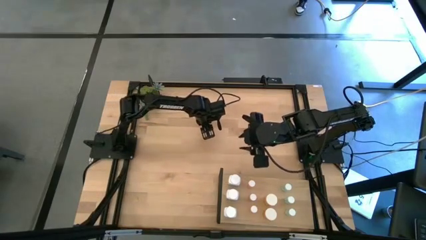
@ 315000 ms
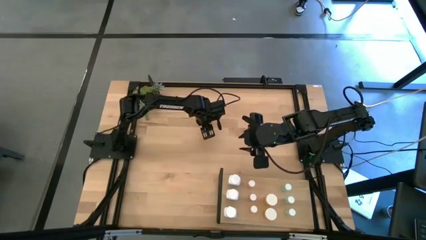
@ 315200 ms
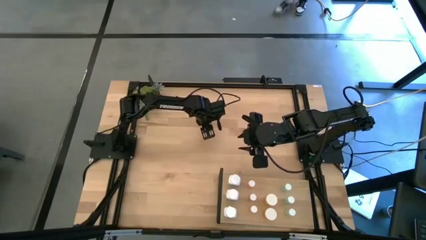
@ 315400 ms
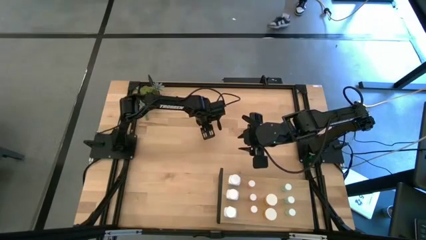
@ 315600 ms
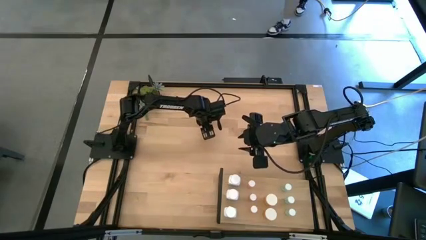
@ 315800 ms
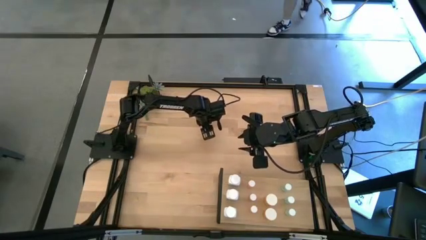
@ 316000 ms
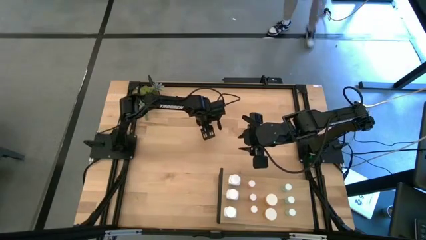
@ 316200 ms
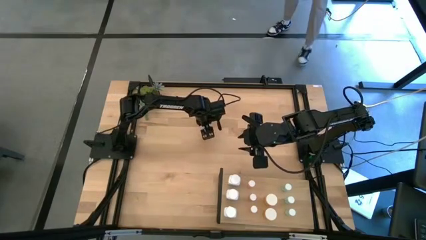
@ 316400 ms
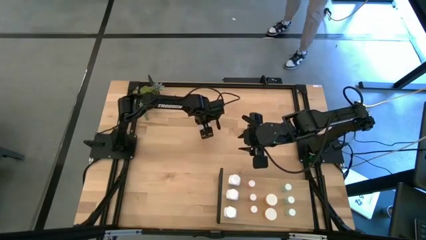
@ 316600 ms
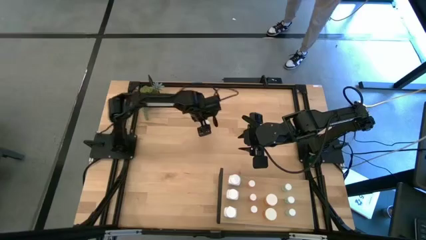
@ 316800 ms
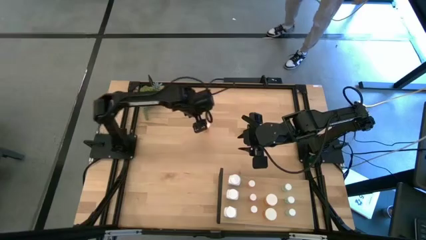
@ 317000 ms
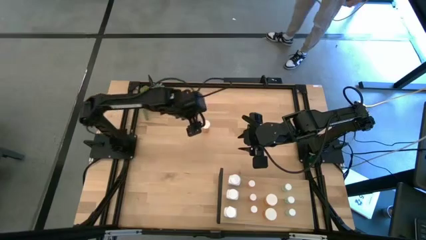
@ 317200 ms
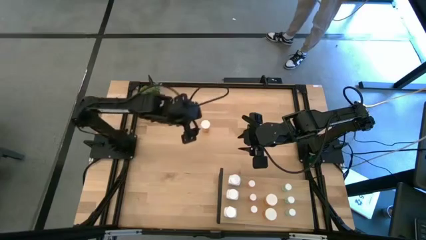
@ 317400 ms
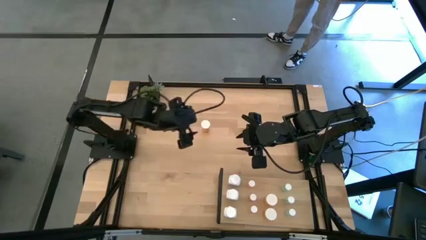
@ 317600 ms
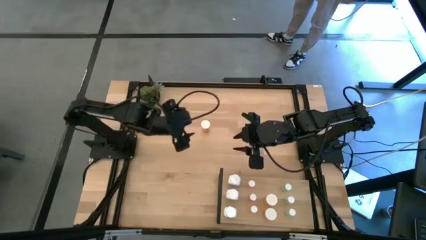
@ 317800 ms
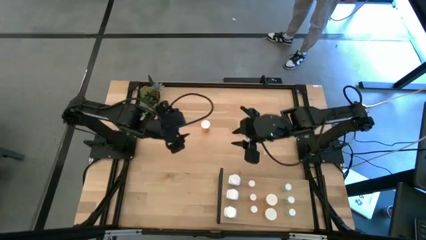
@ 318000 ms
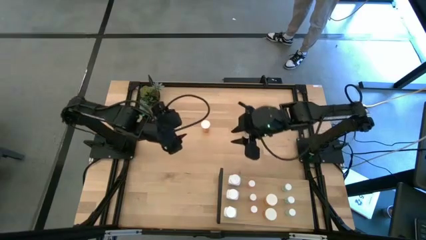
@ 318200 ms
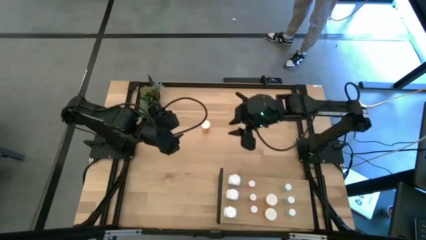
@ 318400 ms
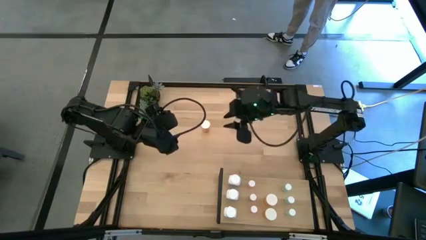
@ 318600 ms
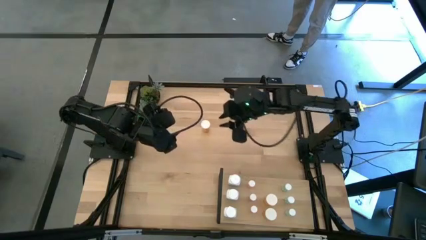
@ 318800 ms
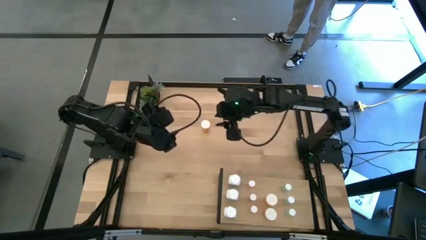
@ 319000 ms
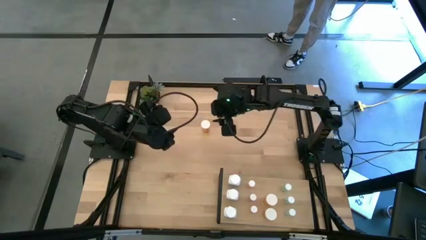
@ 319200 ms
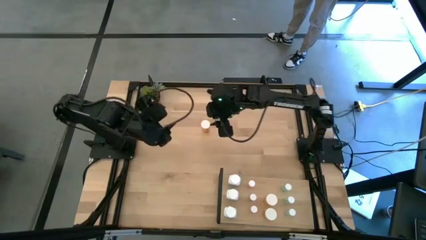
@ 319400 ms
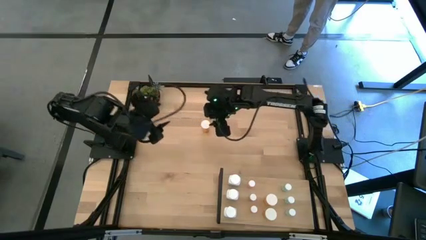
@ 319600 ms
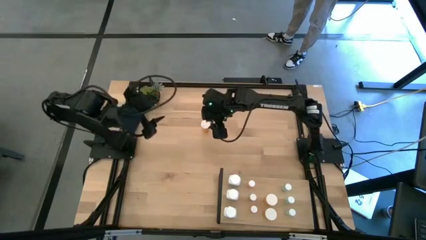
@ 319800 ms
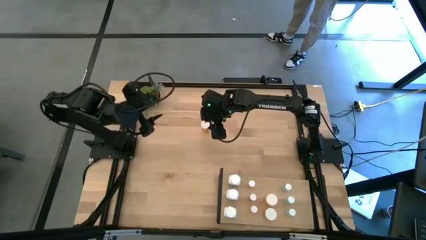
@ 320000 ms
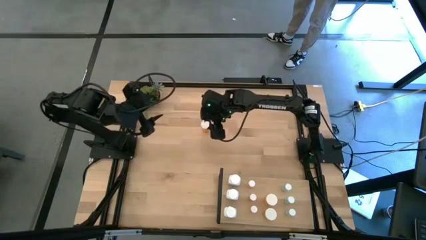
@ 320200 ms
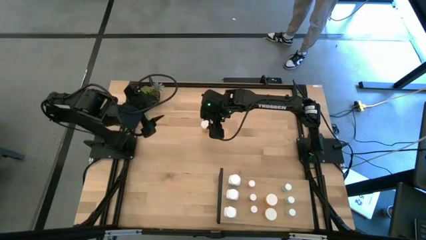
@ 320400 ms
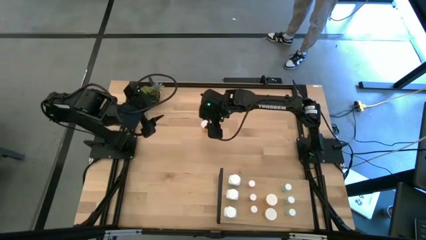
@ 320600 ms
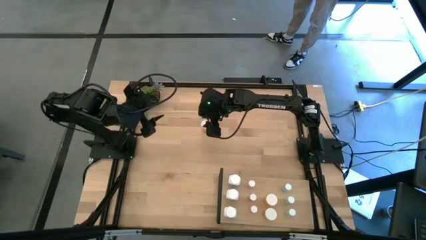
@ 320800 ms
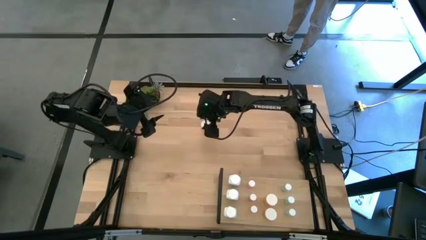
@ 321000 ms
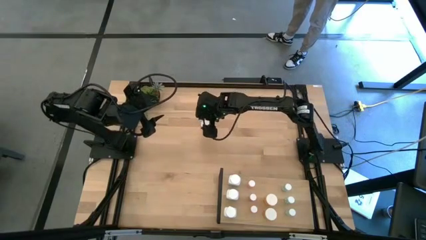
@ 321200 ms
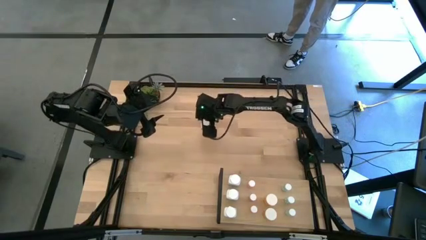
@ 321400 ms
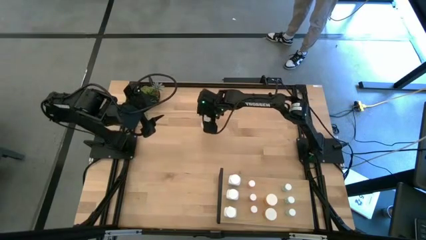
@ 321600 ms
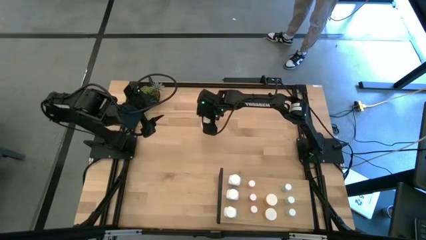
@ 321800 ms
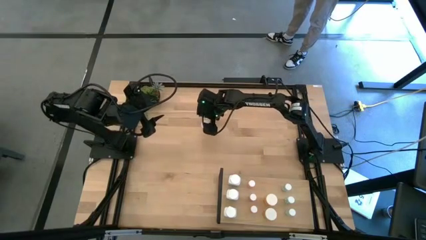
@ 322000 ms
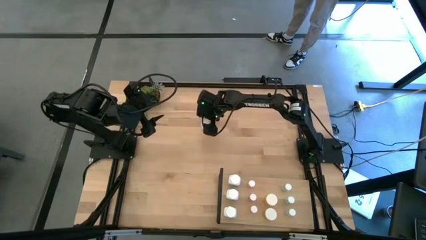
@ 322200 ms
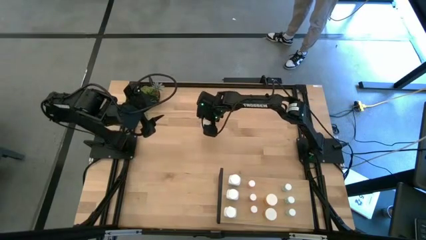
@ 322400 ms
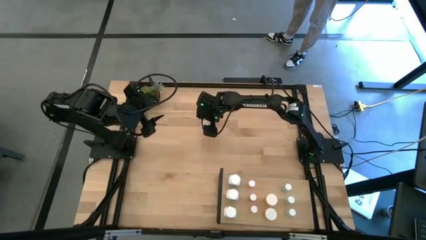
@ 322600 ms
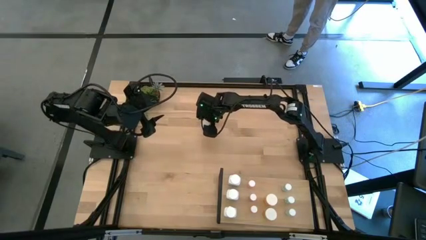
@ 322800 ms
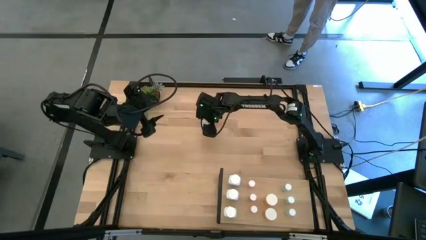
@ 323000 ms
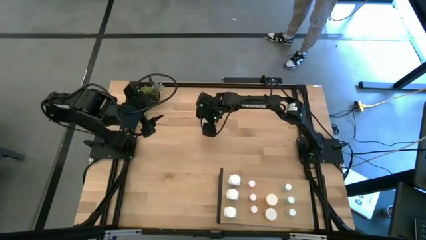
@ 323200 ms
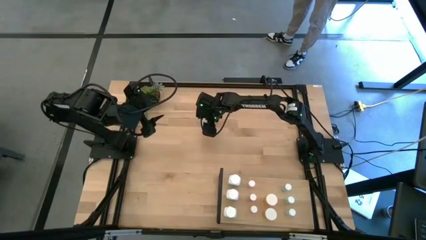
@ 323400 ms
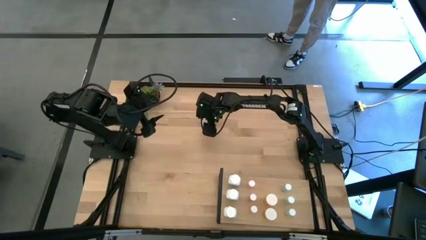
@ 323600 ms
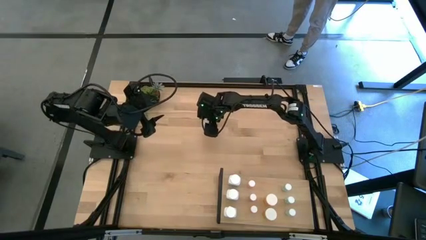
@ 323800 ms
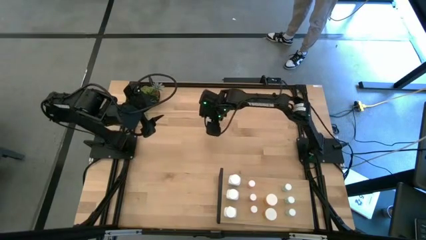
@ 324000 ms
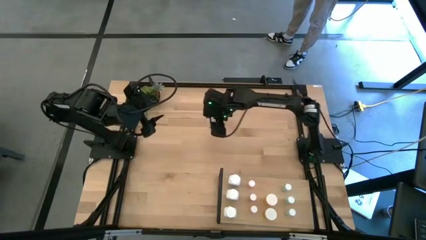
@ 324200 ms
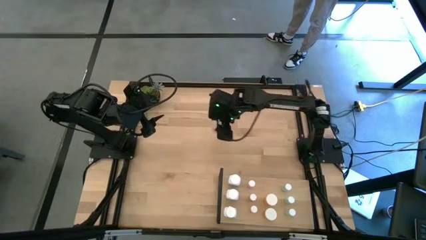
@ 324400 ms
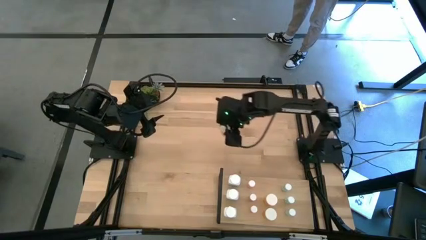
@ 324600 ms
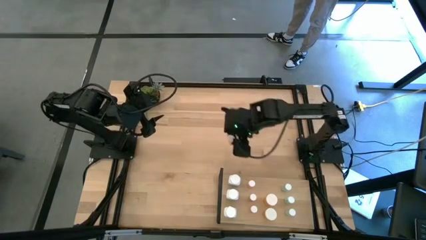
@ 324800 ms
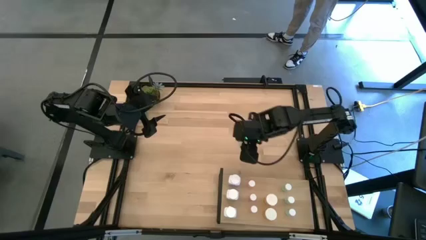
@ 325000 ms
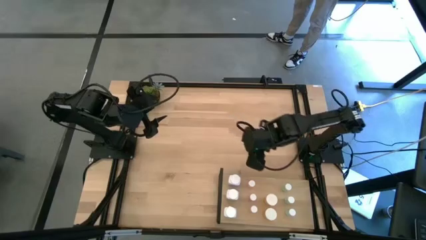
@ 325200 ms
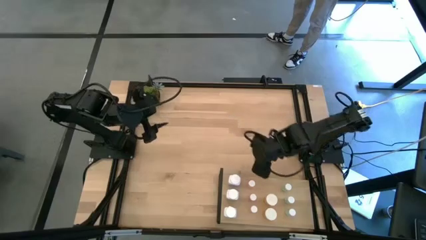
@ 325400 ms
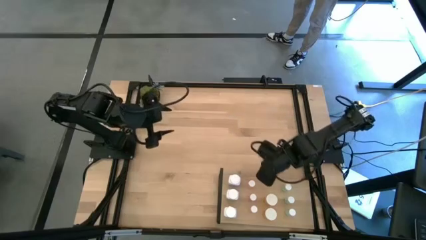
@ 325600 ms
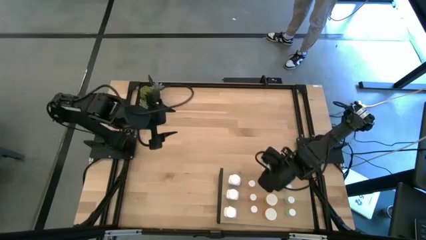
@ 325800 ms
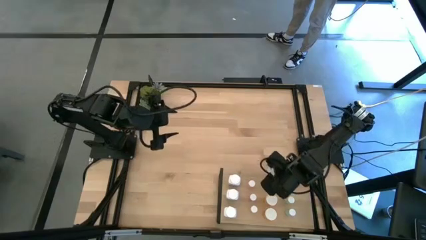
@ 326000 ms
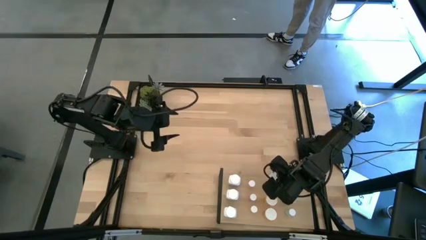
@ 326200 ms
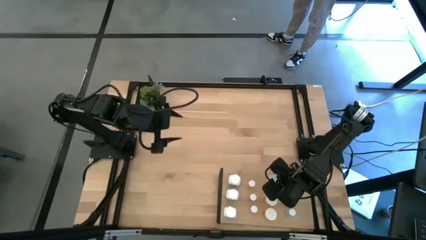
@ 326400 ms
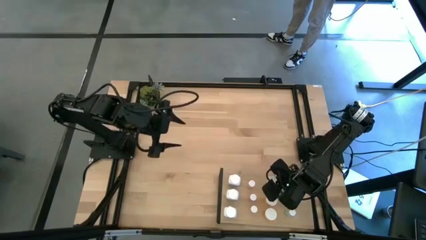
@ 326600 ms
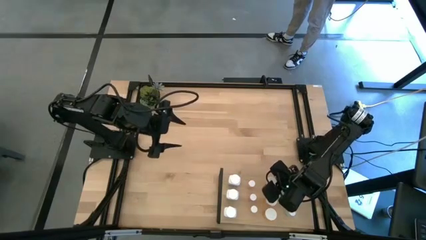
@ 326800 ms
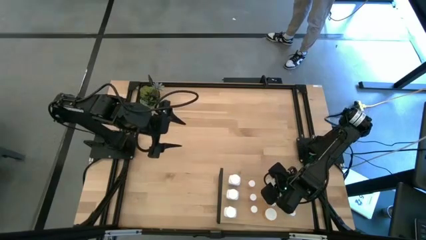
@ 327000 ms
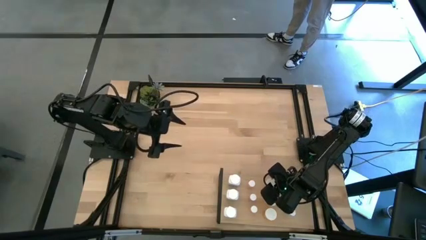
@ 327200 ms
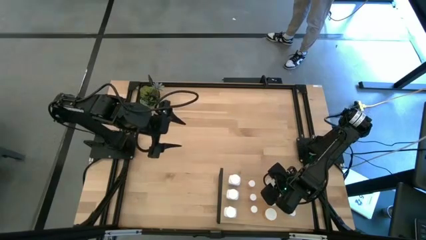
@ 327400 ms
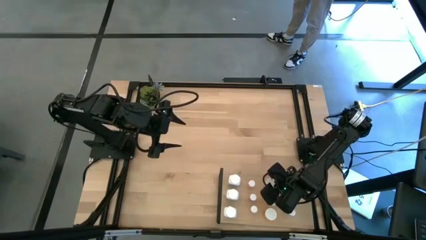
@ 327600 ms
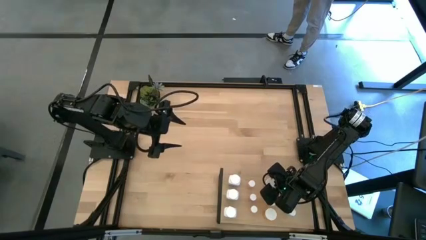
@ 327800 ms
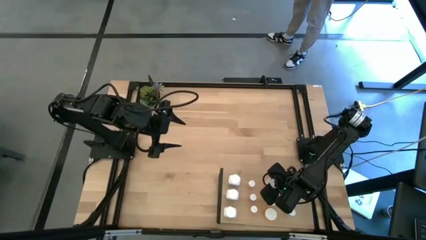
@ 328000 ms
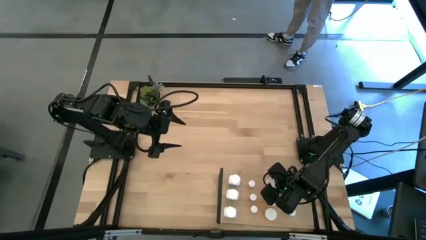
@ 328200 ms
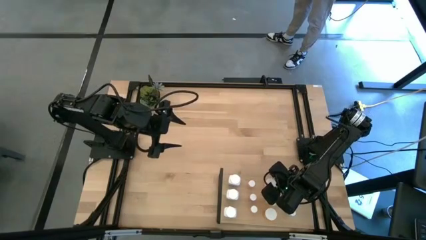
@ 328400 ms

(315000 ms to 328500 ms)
Task: Pick and place medicine bottles onto shelf by color
Put the orange pill bottle on the shelf
